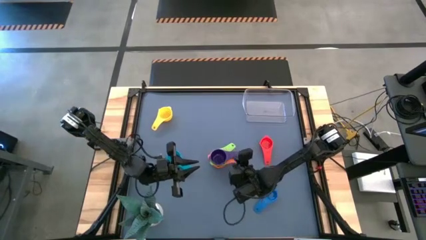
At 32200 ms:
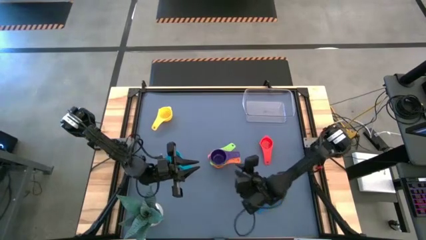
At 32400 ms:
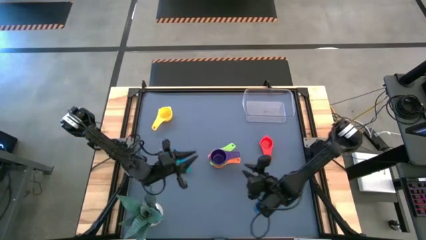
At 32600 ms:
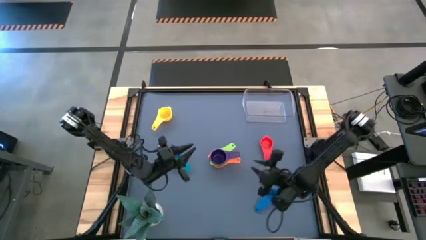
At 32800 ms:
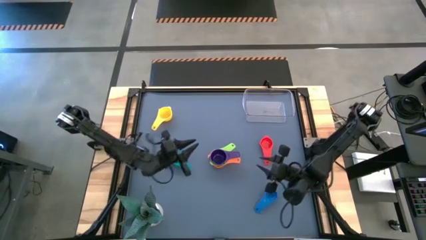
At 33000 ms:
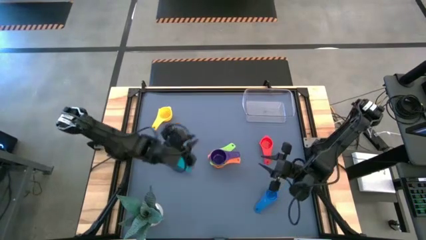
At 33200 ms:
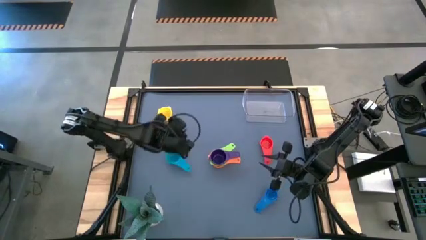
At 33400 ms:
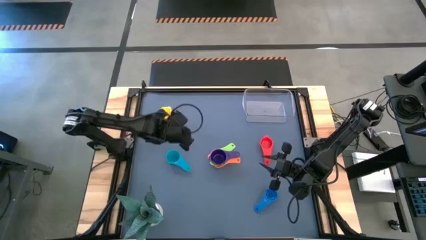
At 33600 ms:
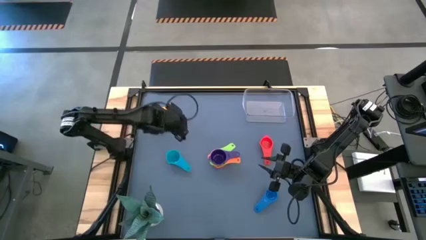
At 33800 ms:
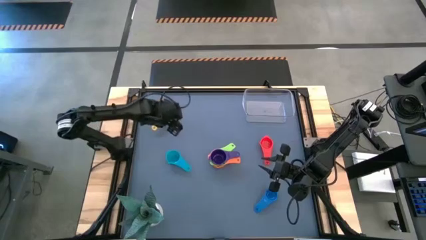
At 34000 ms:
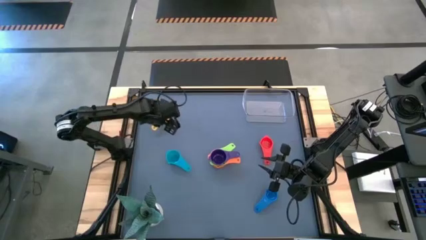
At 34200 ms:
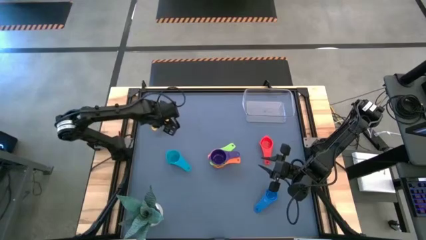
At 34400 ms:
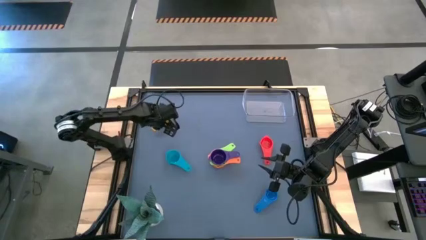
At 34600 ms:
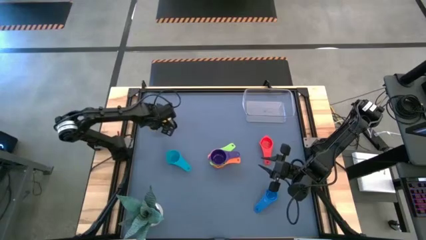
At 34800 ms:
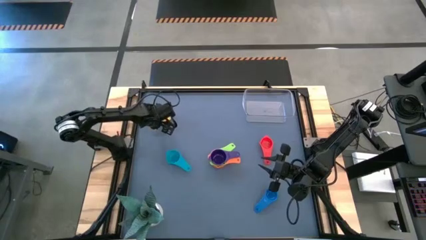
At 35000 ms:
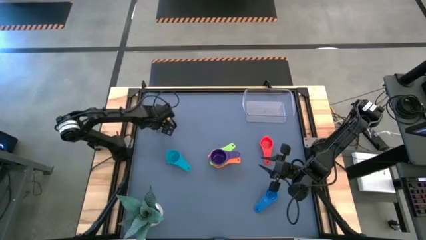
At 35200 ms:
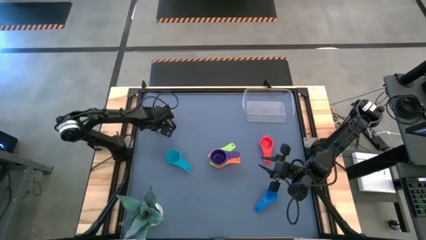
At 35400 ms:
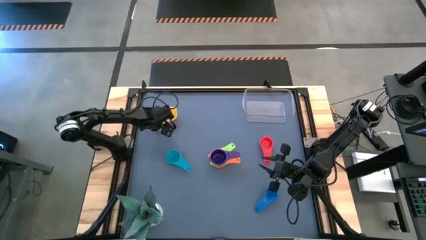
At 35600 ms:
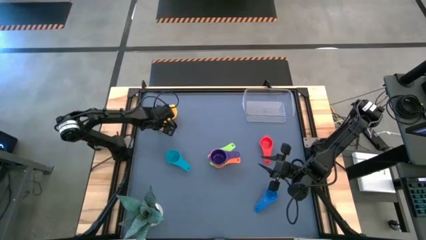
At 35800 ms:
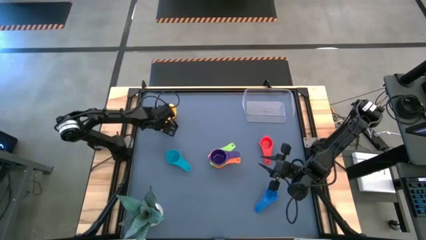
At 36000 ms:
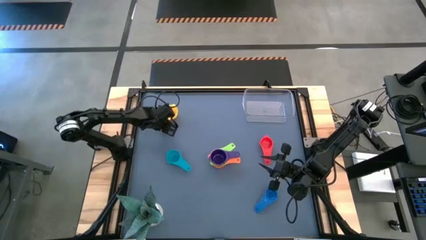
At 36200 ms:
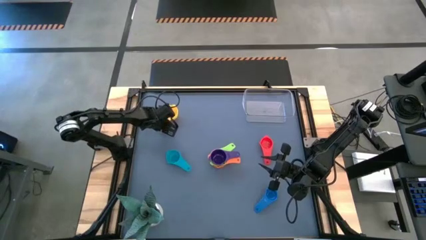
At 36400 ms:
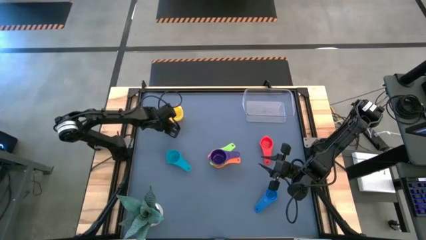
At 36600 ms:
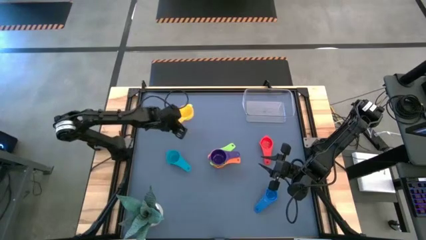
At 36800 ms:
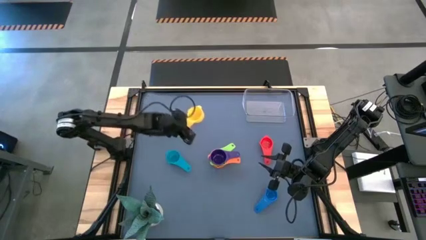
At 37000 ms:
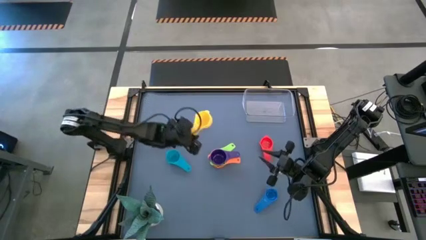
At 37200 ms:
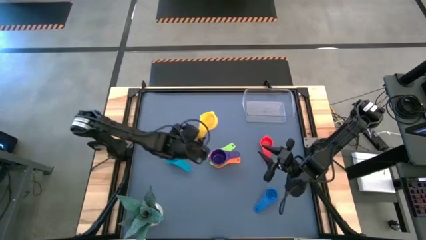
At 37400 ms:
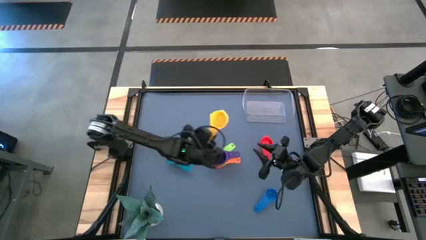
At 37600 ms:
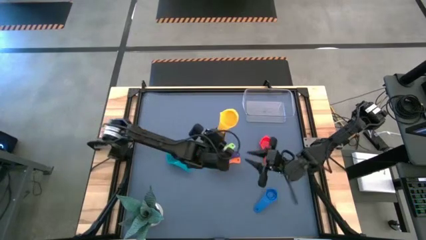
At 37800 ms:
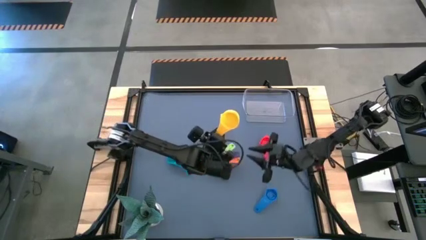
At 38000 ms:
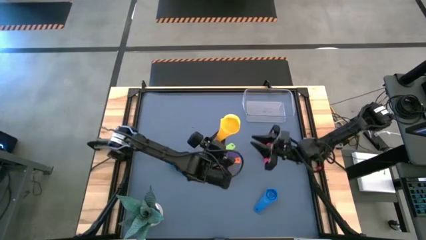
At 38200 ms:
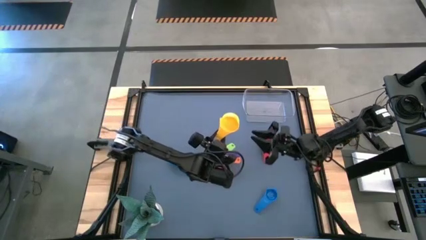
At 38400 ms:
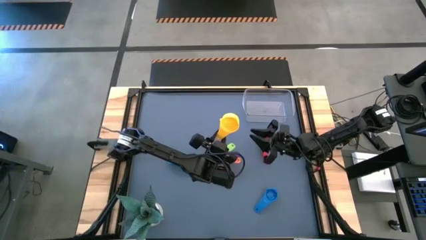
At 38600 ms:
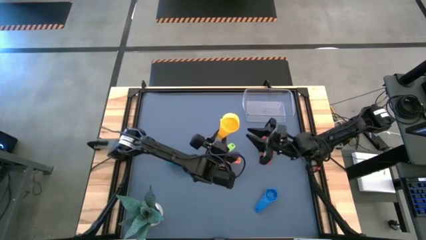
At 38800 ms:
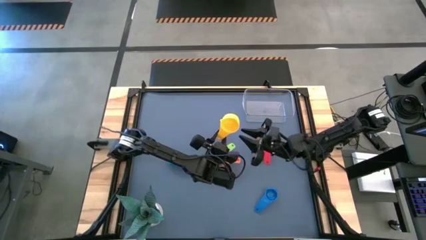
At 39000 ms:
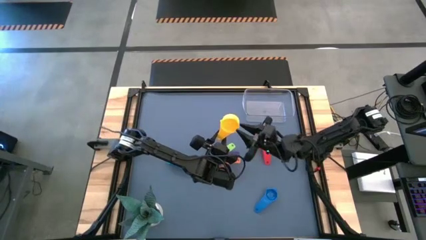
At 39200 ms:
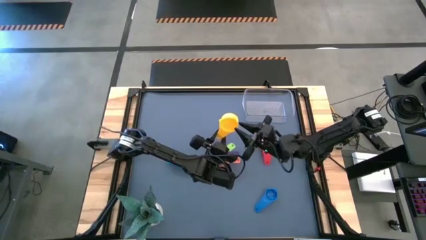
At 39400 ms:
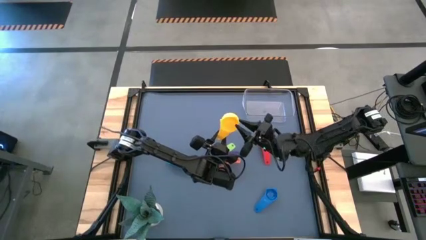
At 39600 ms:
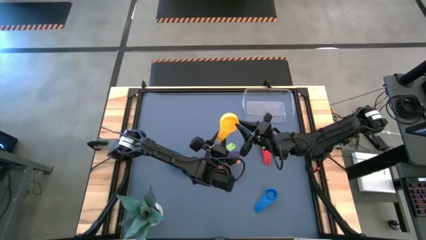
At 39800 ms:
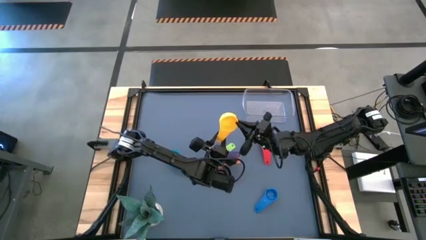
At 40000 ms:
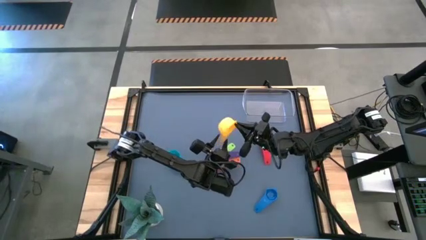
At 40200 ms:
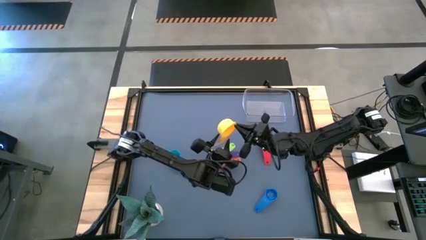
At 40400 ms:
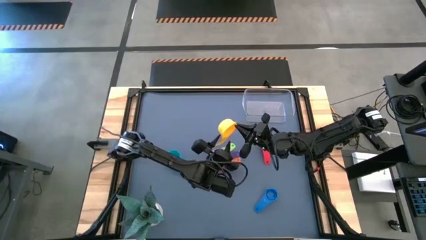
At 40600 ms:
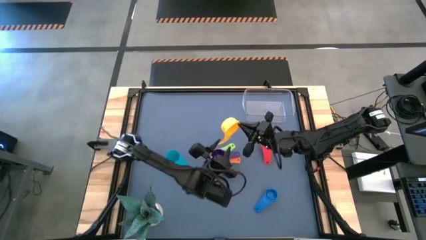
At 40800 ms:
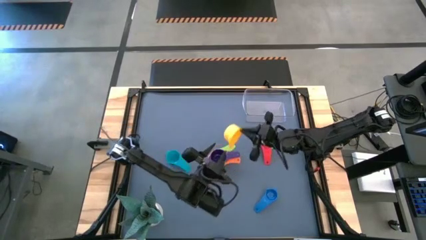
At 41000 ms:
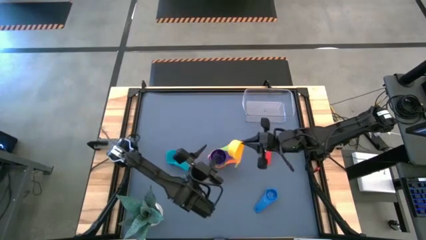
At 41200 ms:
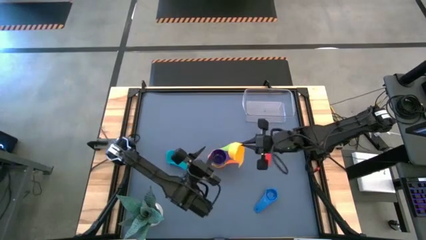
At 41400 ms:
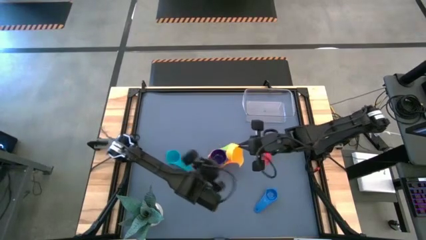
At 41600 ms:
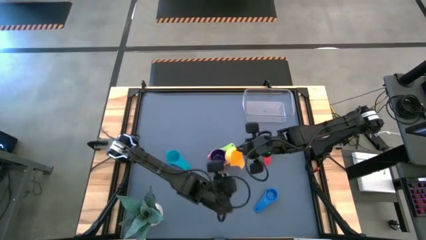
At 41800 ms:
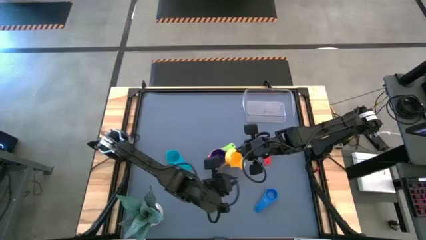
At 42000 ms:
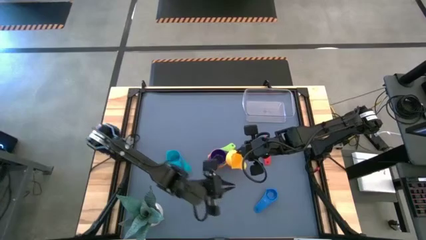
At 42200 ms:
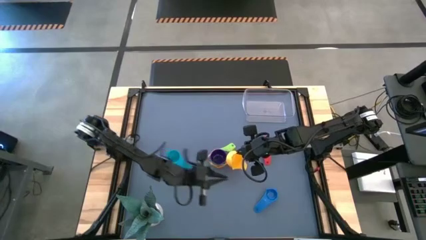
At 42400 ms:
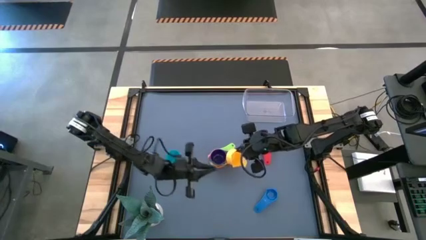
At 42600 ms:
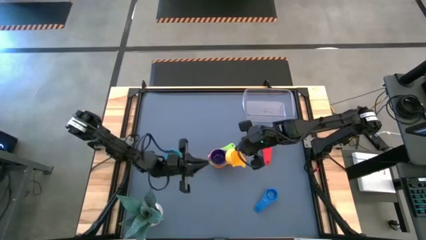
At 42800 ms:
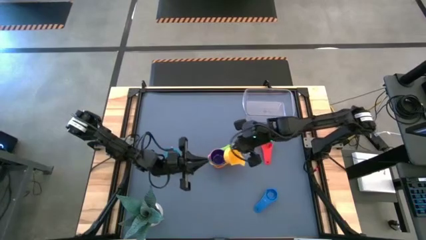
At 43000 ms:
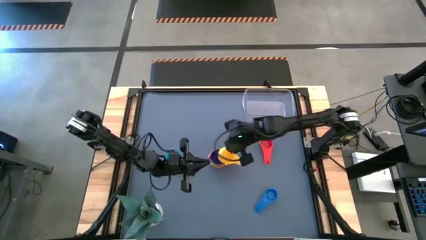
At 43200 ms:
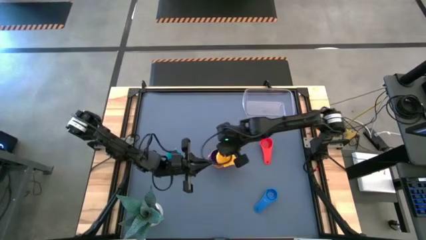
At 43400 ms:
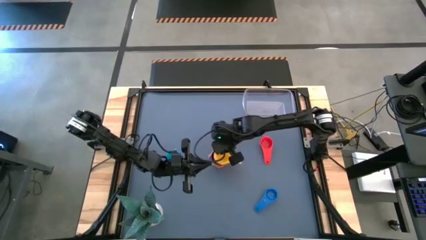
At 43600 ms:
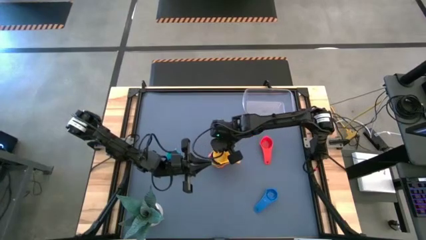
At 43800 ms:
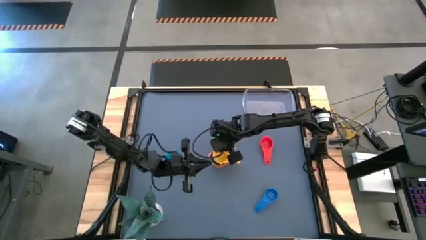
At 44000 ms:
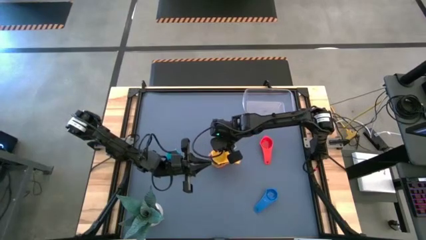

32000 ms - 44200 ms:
Task: Nest measuring cups in basket
Stack the yellow measuring cup on top of the violet measuring cup

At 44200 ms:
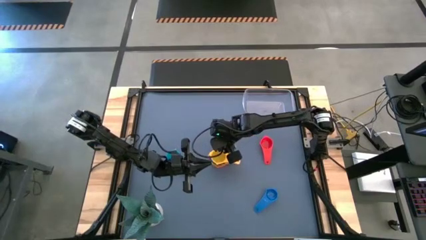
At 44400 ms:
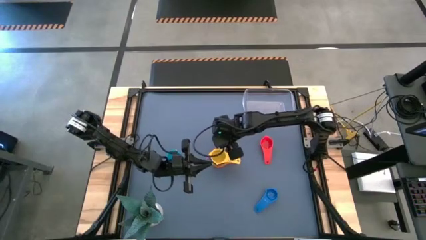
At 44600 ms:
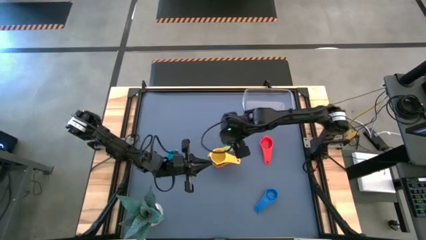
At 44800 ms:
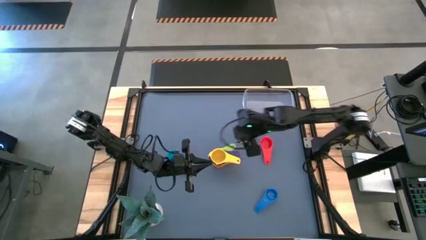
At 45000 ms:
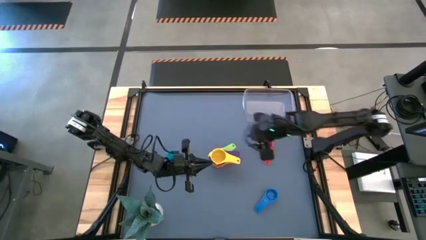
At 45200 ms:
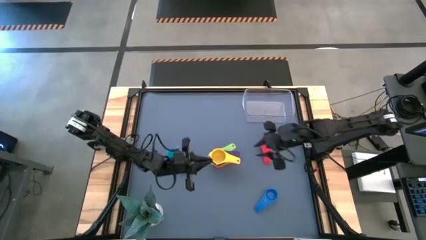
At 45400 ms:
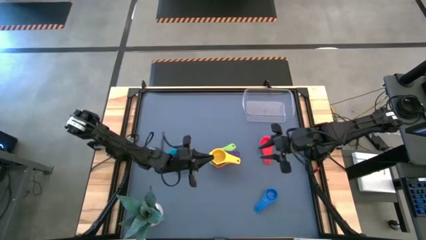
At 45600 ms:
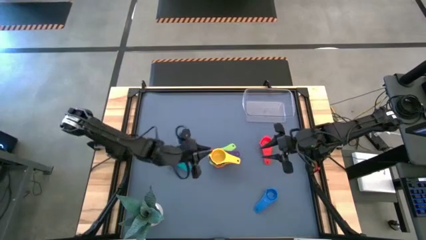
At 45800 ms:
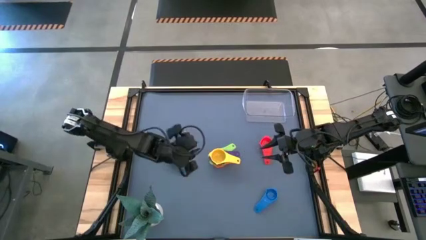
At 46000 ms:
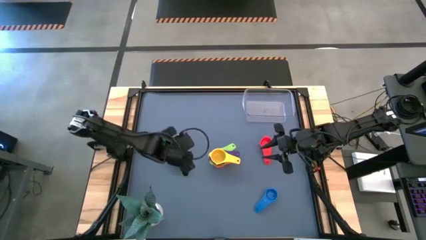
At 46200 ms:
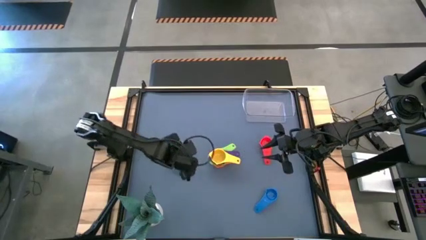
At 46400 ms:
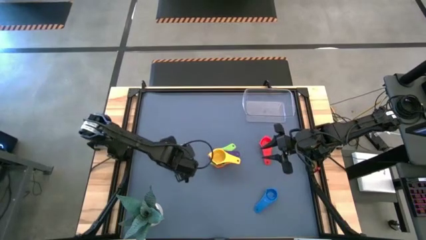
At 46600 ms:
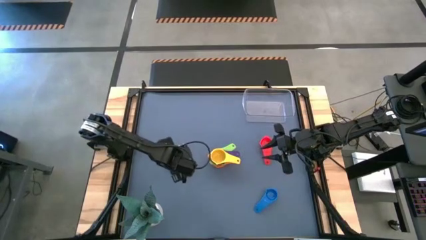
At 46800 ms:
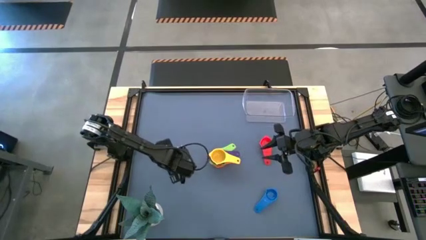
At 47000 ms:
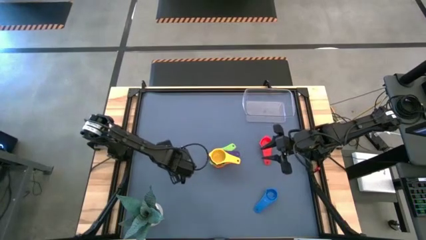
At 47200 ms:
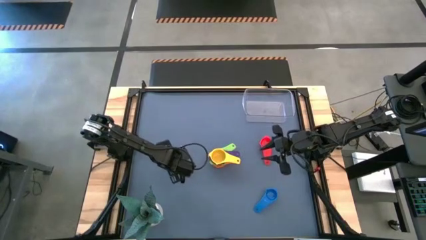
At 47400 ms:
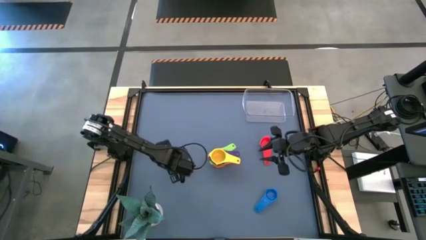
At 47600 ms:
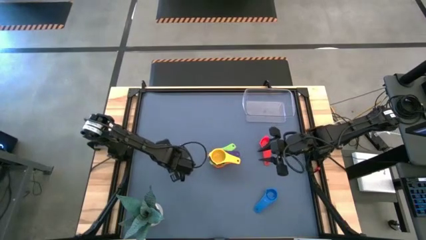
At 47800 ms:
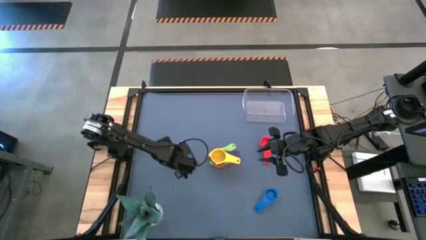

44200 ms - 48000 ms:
Stack the sky blue measuring cup on top of the yellow measuring cup

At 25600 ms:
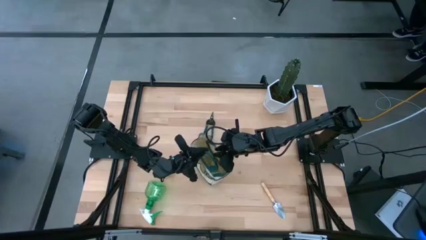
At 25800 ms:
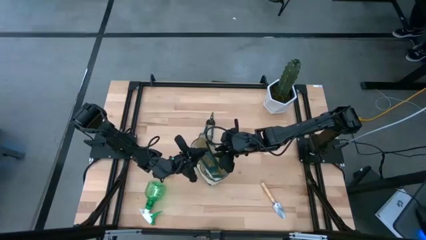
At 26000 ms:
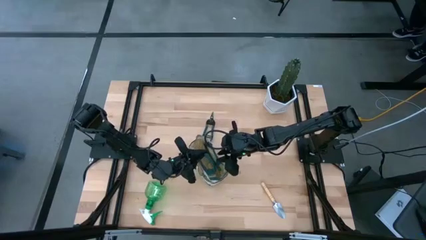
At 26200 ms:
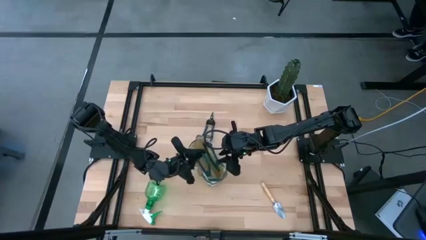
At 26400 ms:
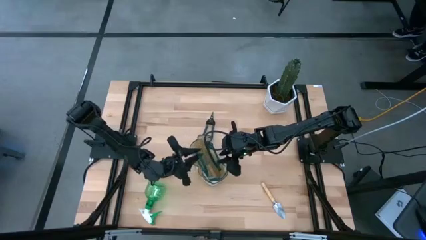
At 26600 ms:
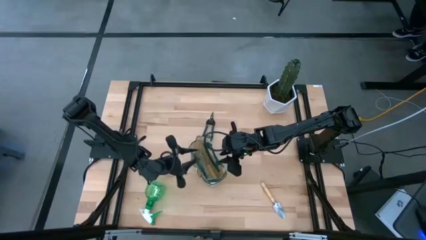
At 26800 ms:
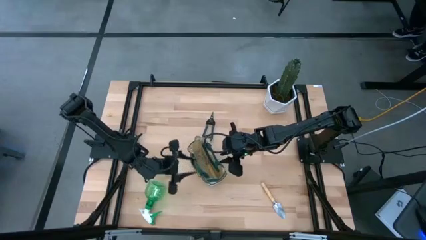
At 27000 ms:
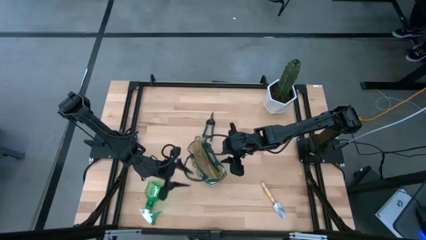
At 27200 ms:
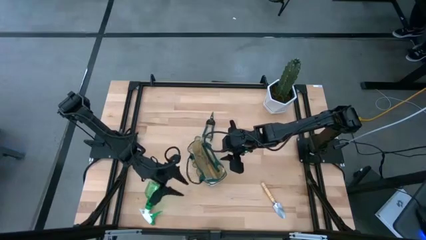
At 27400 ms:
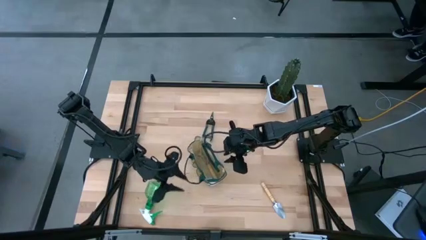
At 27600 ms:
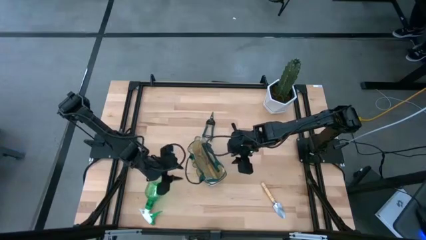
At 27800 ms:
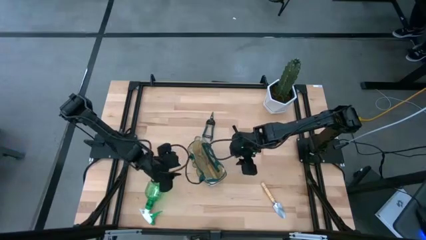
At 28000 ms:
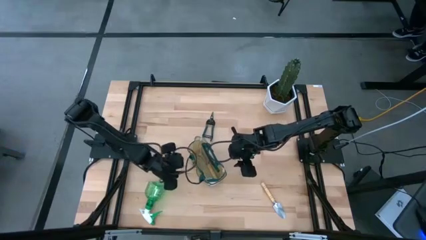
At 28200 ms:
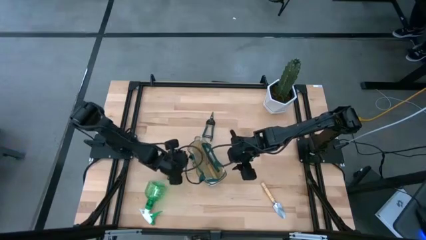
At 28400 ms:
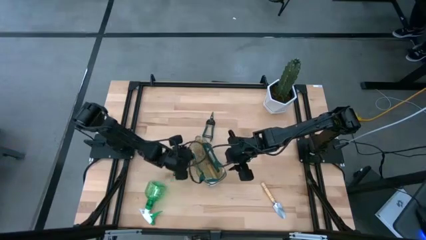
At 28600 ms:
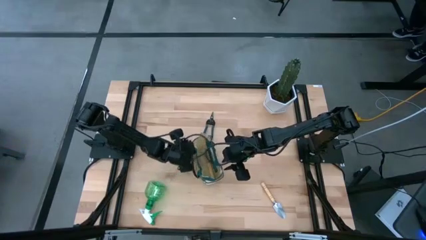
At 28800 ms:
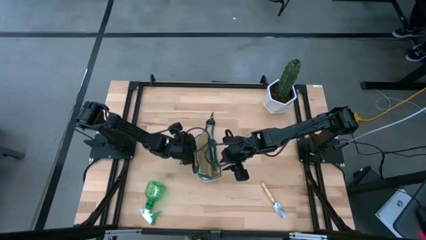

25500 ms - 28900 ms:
Task: Pick & Place Garden tools in Gardening bag
Adjust the gardening bag
